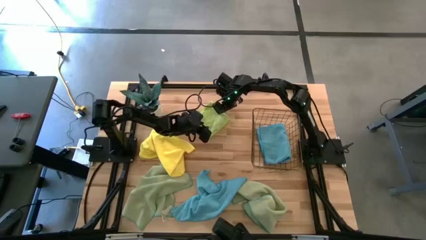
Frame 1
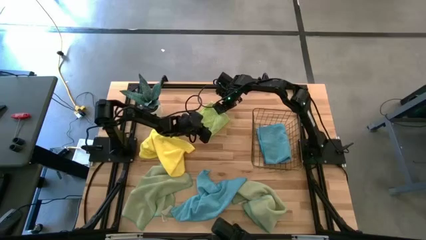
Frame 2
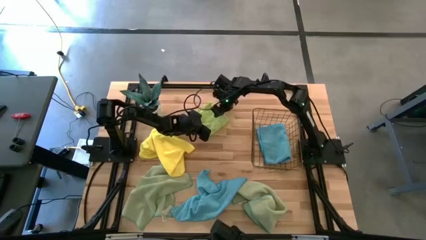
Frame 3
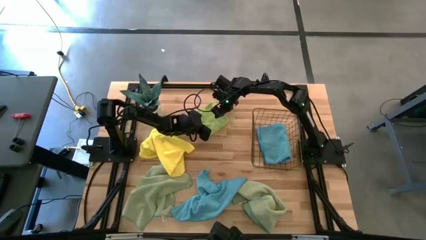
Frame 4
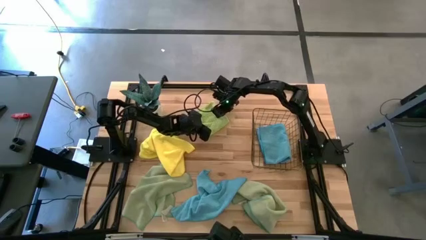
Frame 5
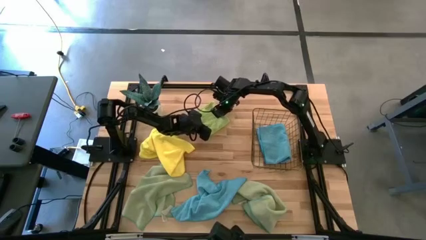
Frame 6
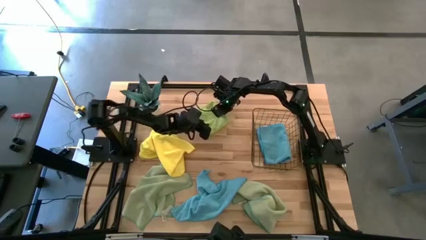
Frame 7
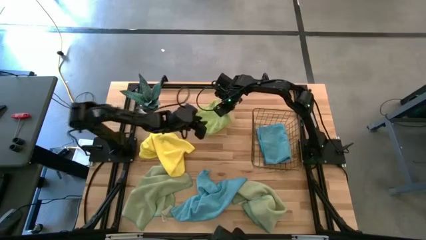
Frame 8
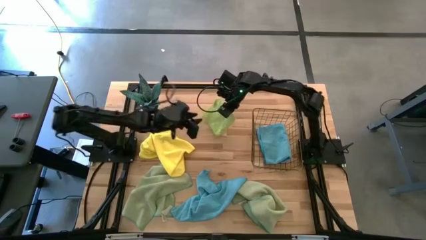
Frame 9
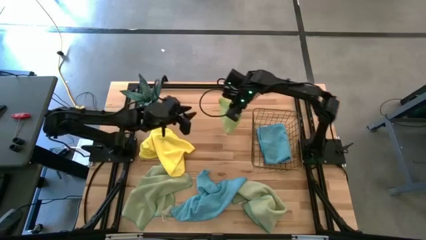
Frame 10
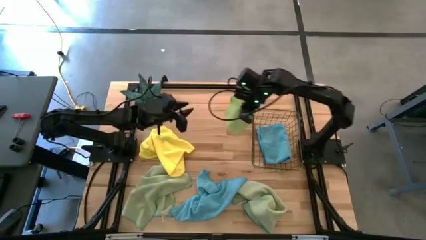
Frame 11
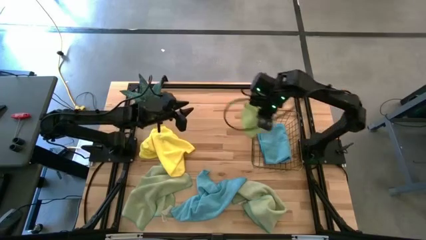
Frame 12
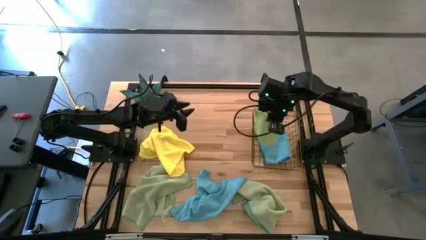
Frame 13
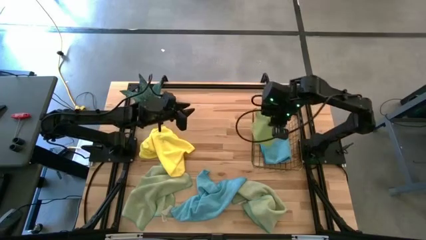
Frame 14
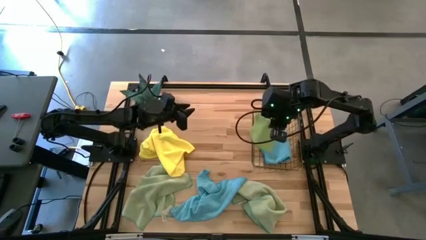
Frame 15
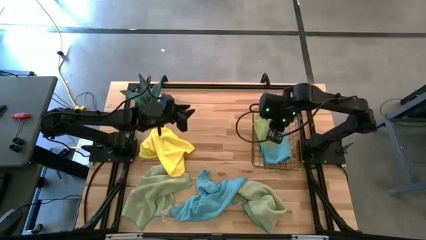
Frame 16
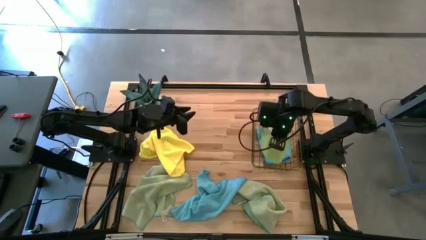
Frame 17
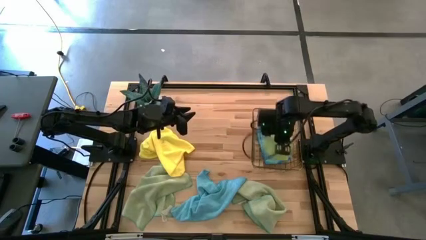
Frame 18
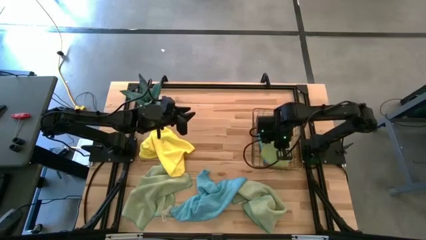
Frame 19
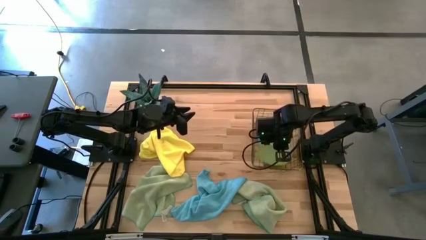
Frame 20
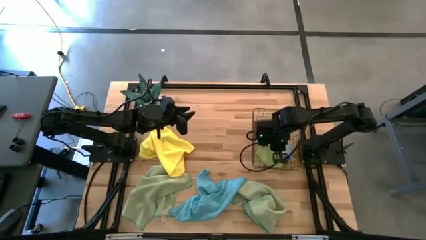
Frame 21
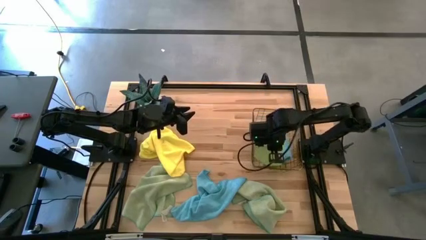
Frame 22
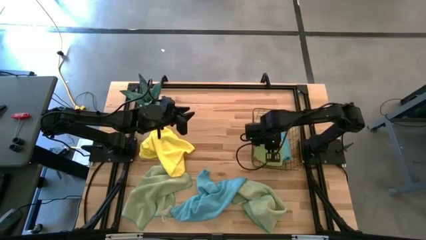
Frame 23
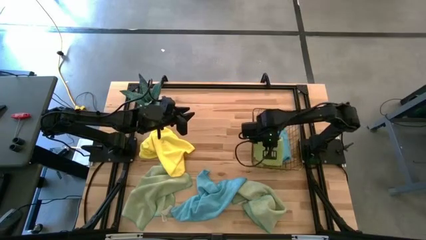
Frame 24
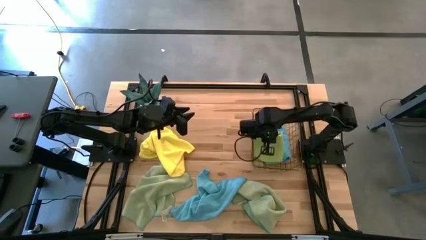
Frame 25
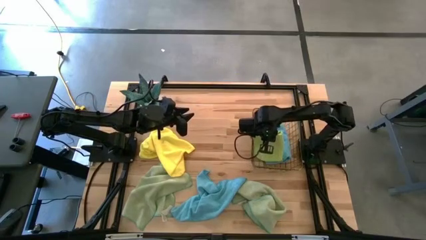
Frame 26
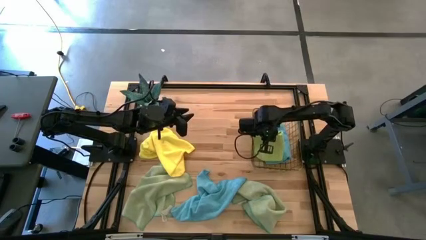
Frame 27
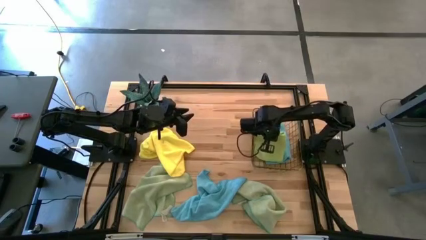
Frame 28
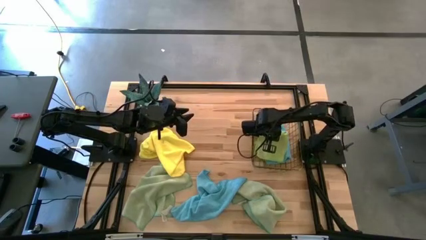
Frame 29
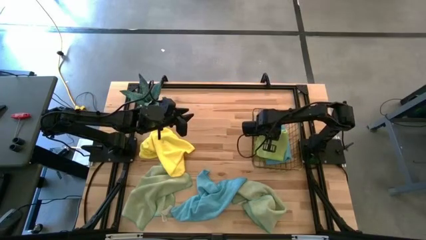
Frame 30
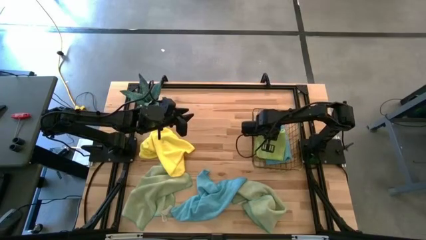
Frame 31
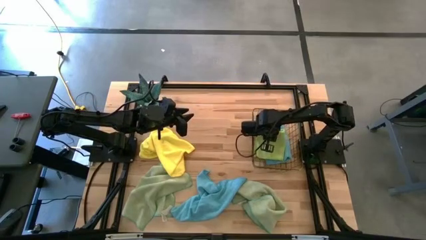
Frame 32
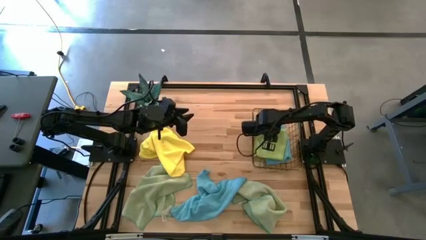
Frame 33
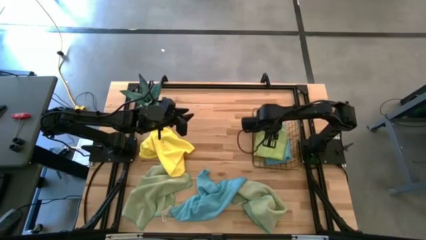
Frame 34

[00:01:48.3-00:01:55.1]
Task: Fold microfiber towels
Stack the folded light green microfiber cloth into the wire basket

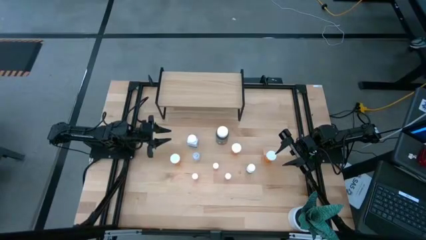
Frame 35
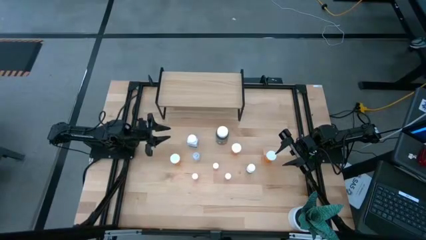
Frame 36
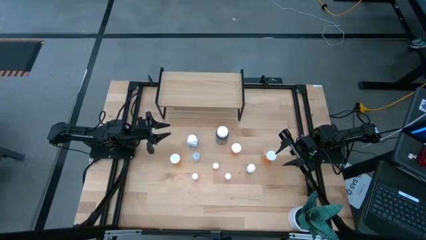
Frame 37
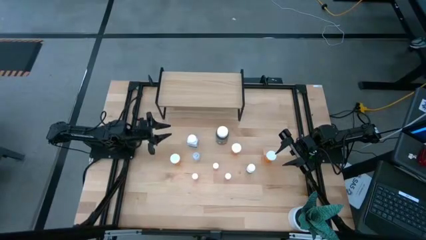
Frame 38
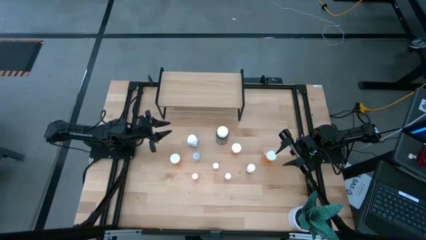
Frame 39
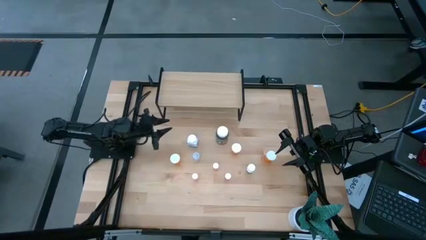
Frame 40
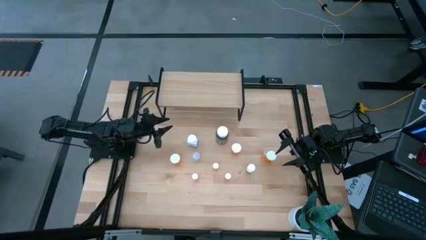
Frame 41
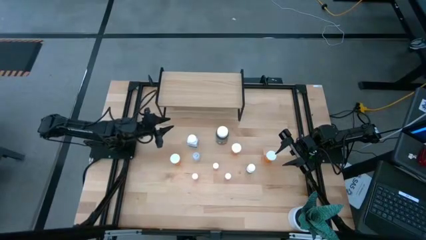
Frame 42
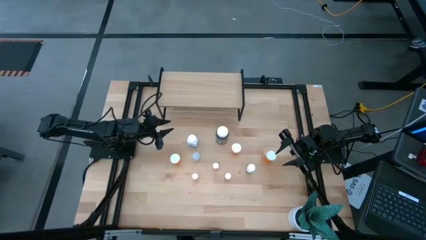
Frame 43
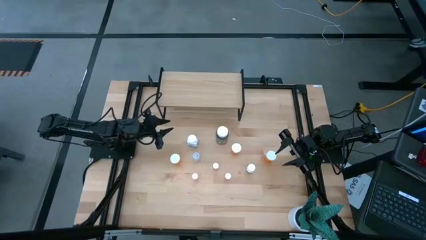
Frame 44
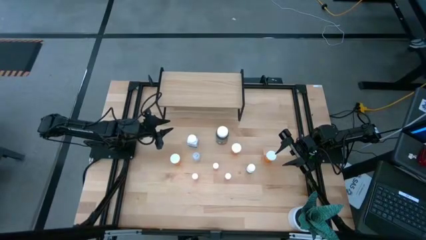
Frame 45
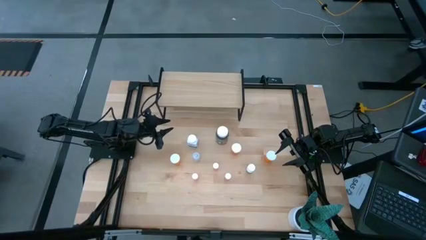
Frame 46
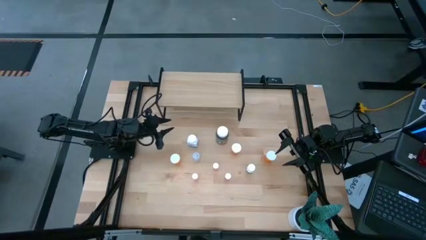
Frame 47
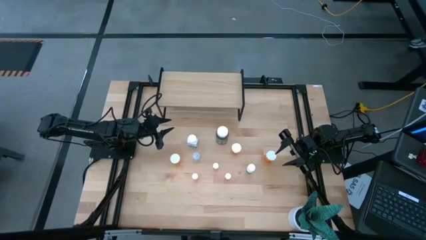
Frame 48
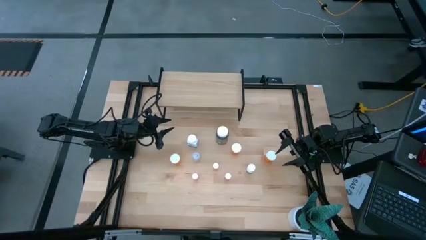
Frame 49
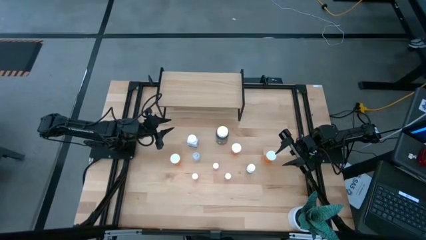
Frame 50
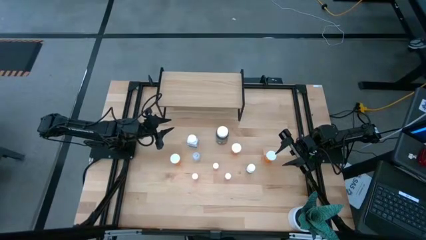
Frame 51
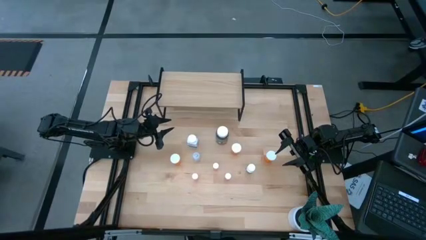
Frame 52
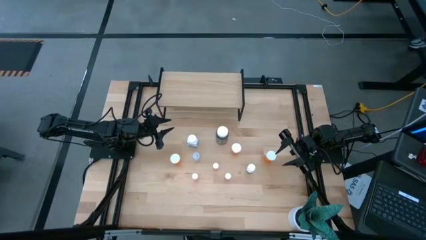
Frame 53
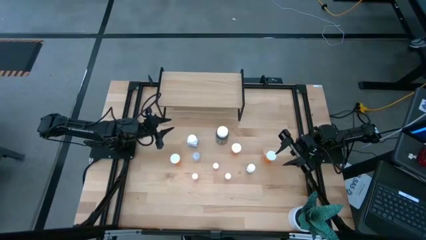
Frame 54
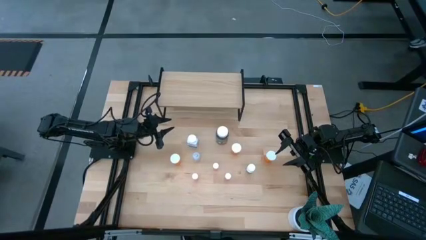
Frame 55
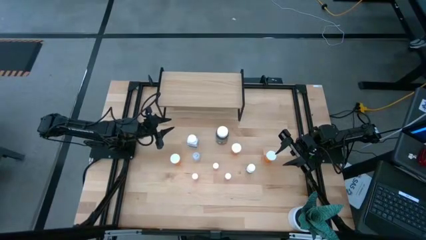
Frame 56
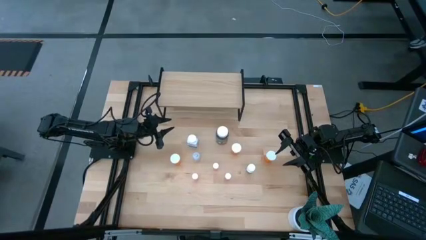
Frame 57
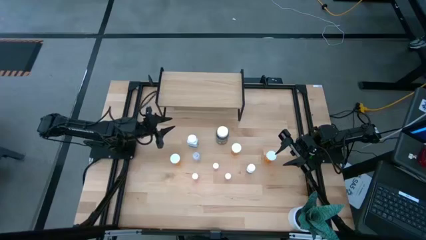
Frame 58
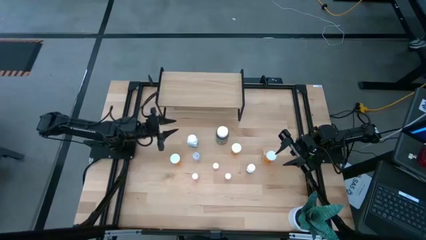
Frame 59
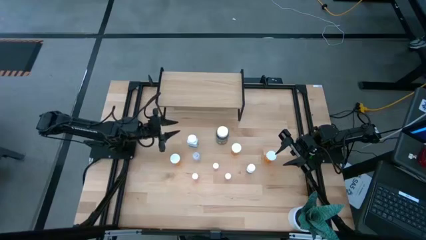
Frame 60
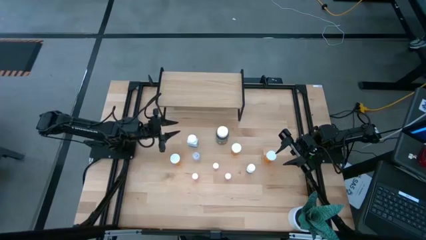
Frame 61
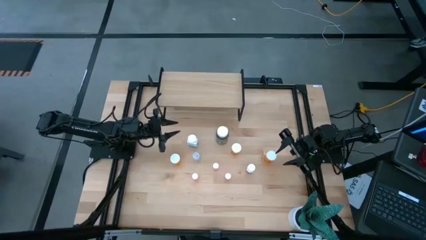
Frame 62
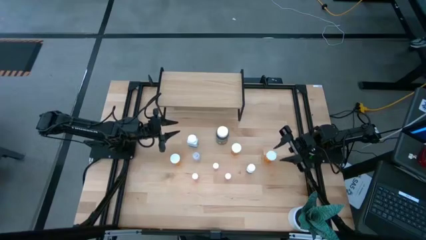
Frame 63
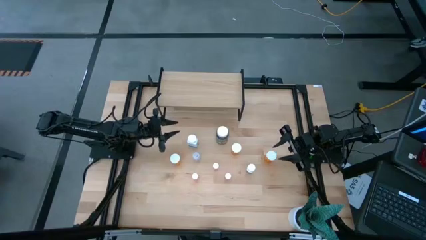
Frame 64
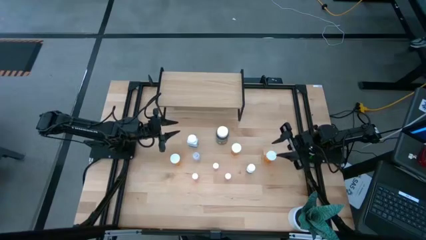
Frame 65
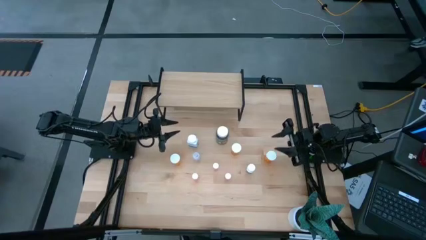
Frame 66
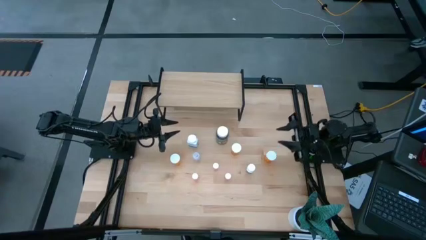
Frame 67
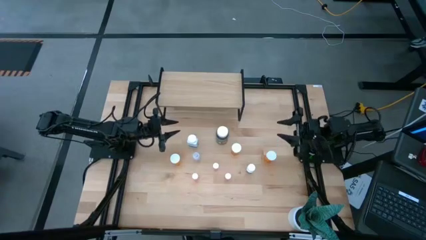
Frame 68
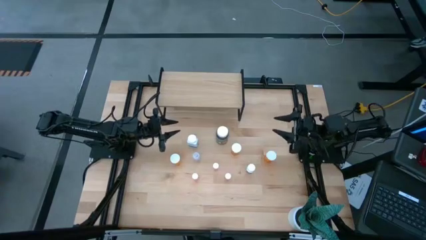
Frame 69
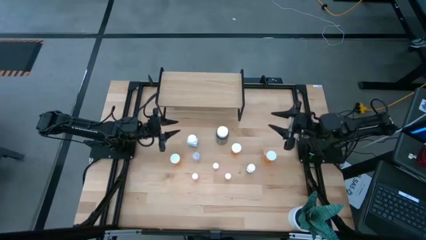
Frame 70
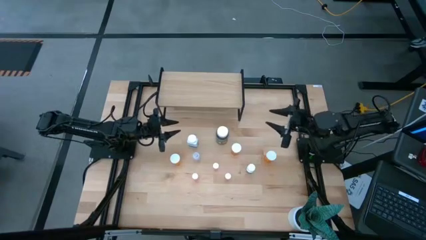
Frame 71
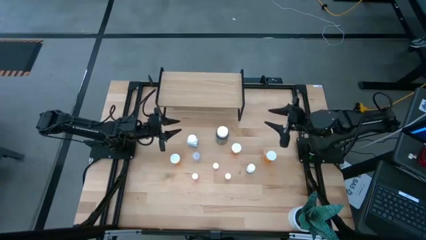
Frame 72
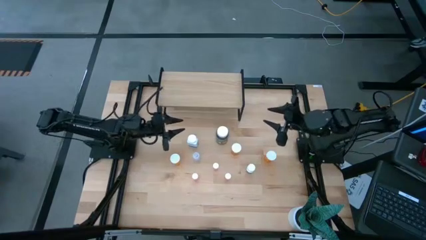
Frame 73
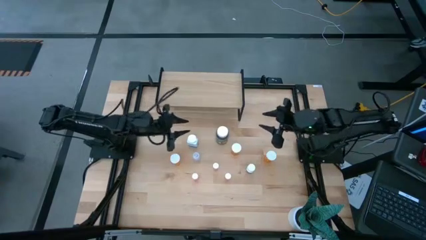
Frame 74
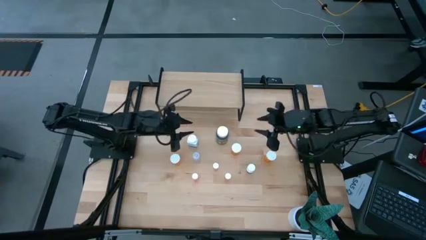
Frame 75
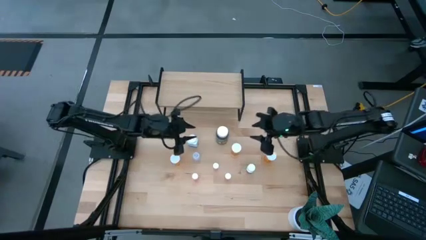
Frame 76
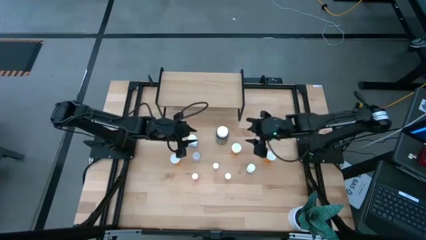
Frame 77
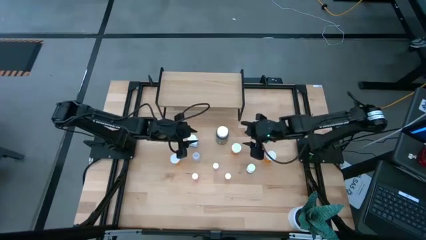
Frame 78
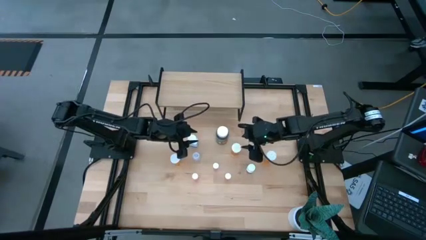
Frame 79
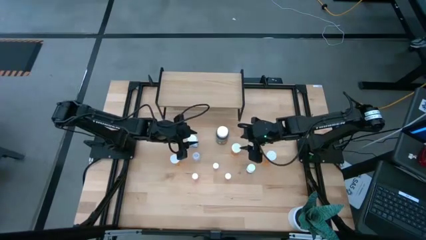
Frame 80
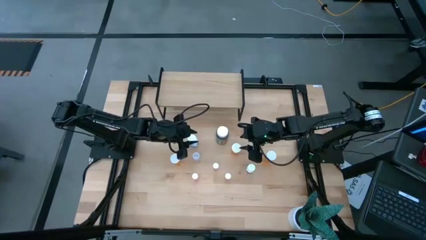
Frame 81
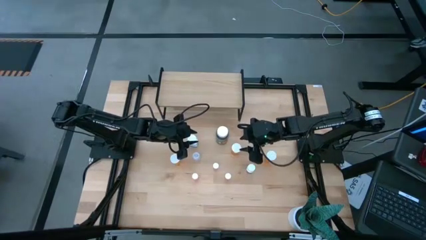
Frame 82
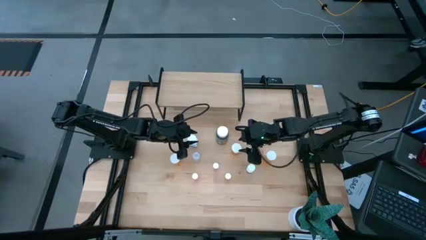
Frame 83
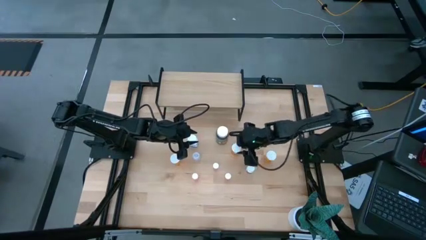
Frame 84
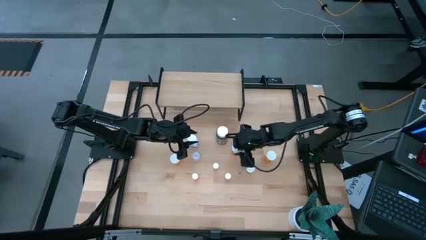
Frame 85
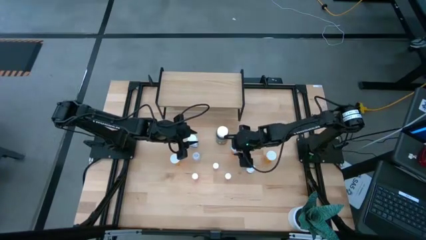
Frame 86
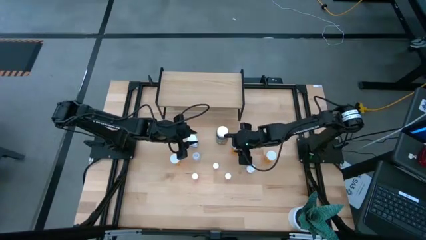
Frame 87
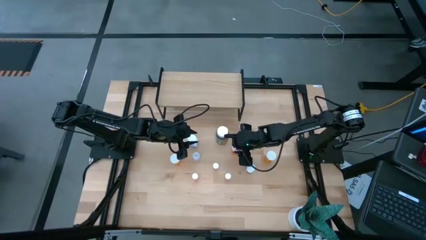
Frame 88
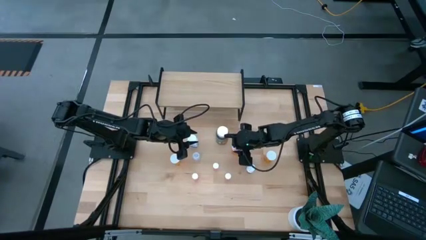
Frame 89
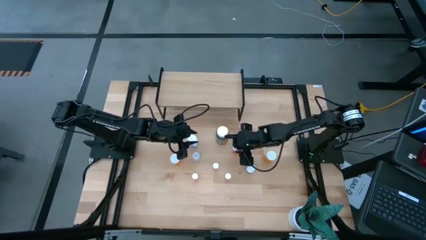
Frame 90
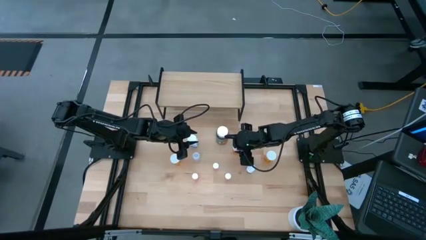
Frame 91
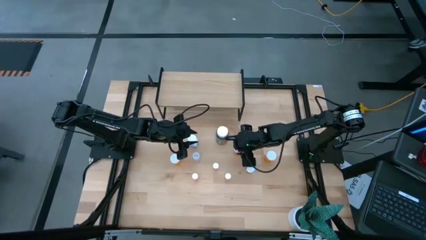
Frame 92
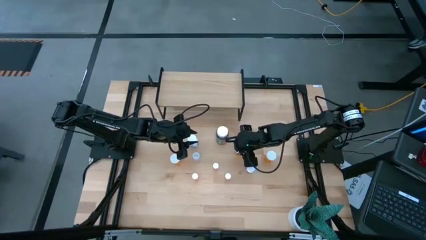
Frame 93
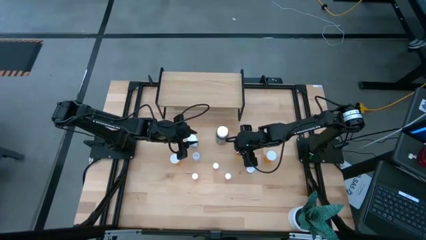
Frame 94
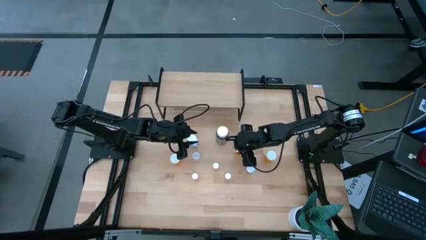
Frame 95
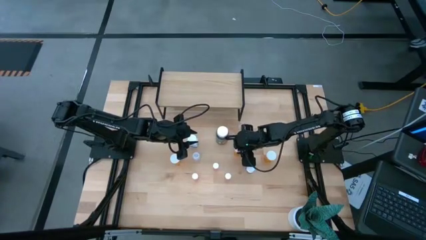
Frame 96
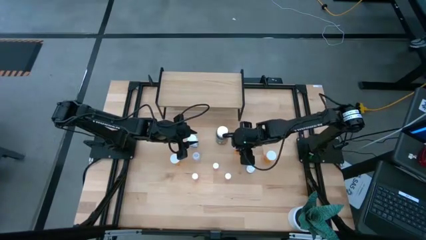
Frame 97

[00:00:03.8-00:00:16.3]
Task: Pick and place medicine bottles onto shelf by color
Put the middle orange pill bottle on the shelf
